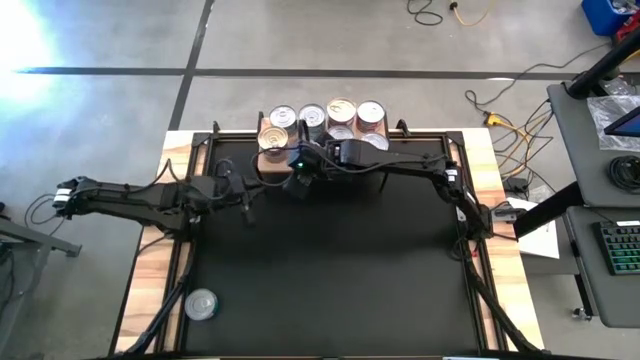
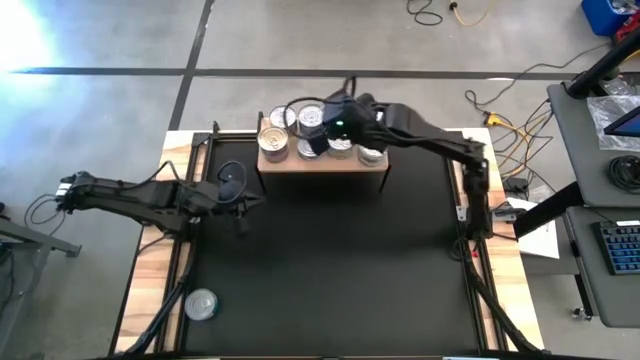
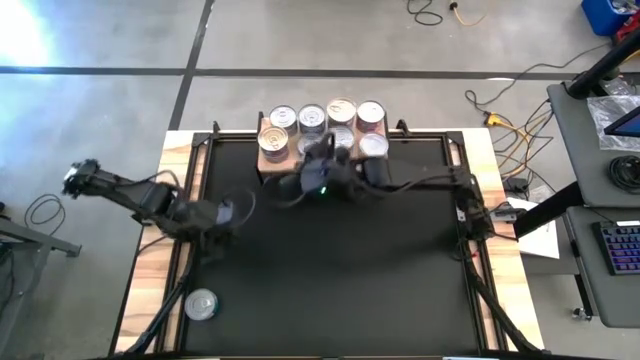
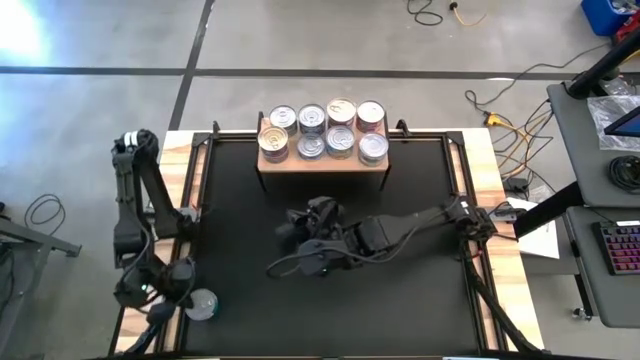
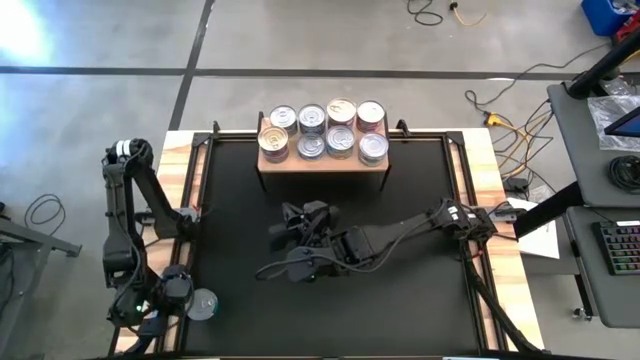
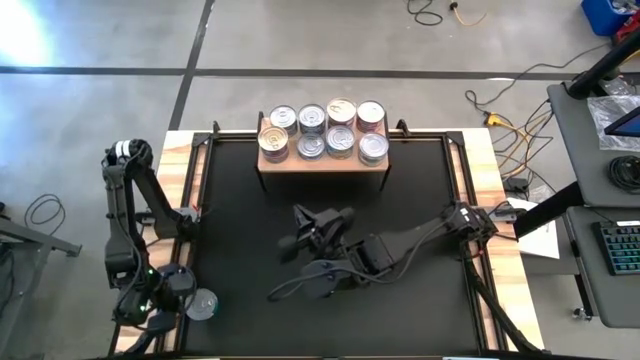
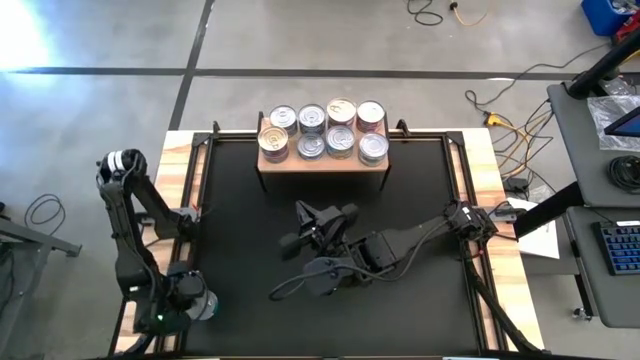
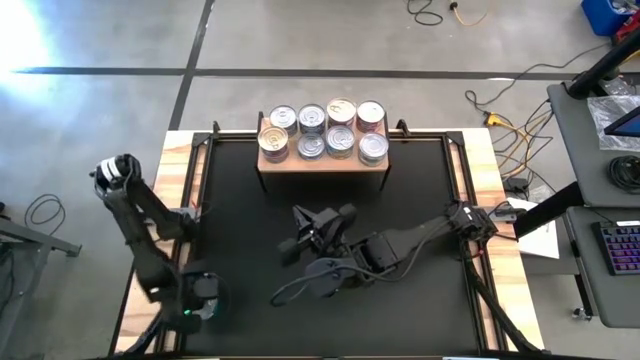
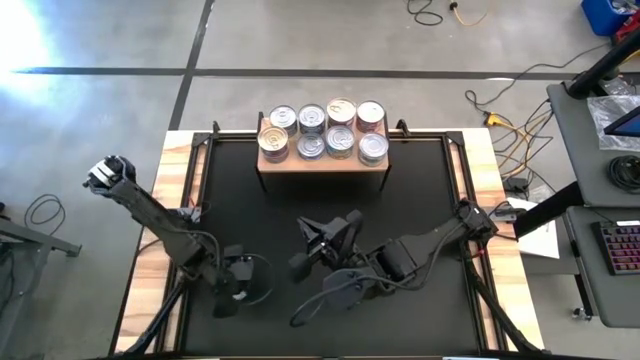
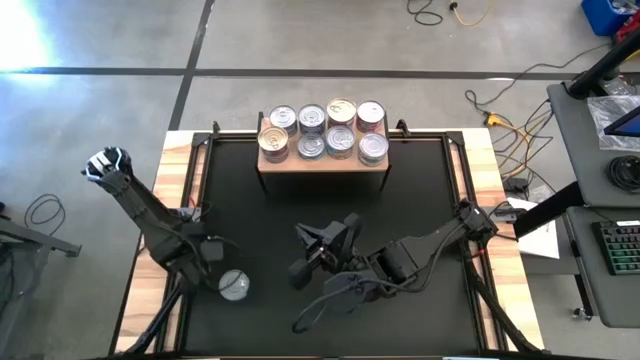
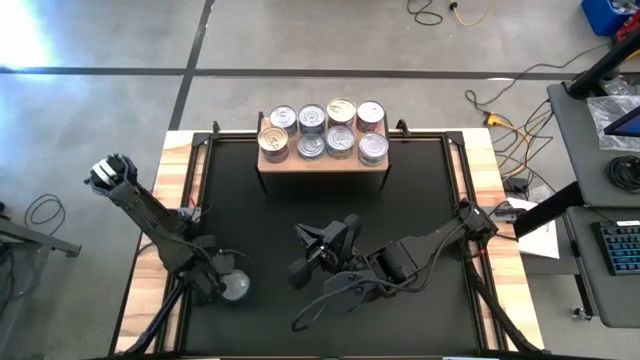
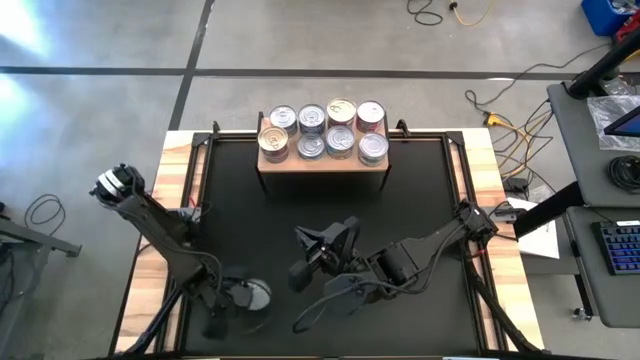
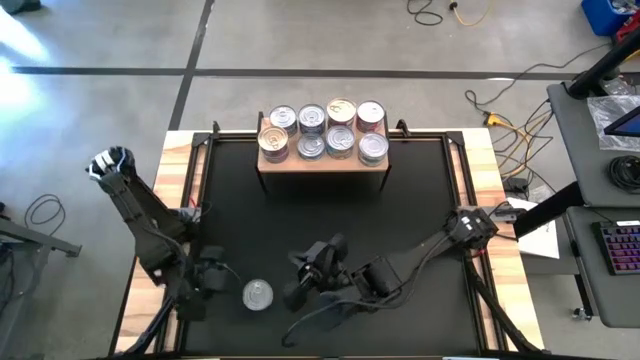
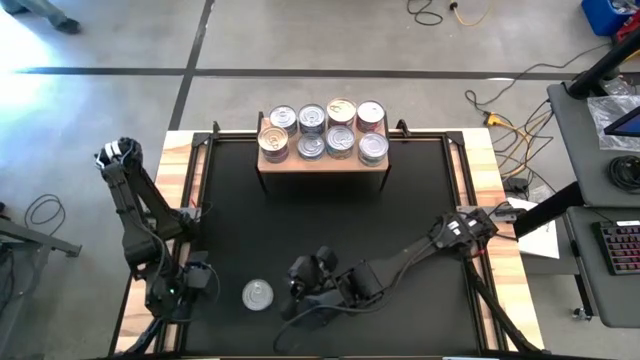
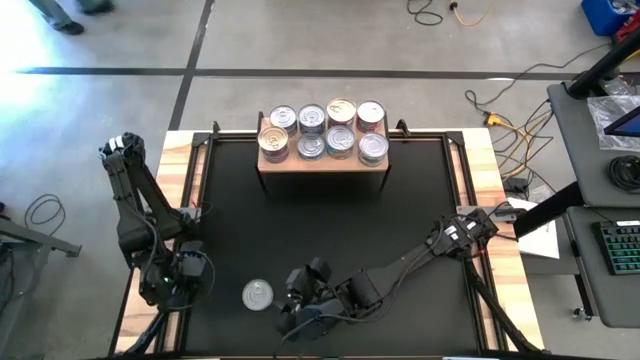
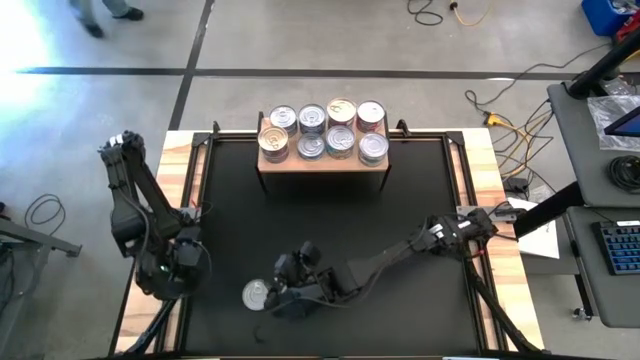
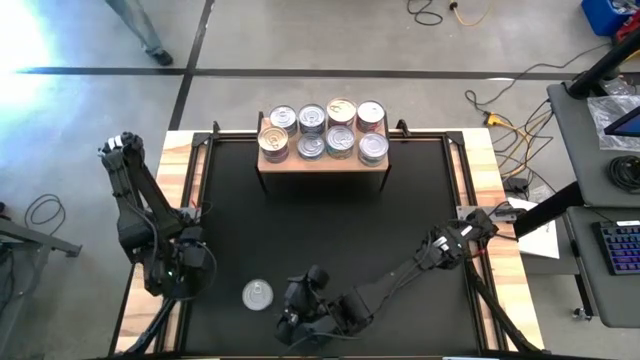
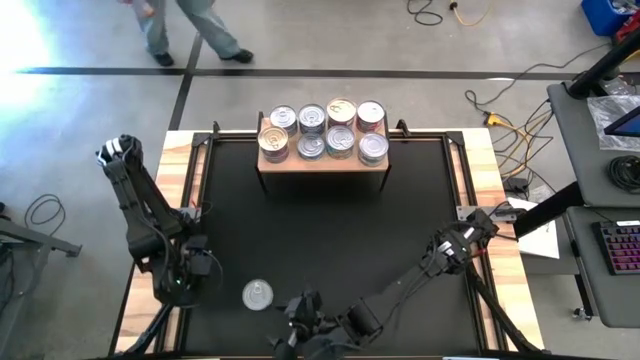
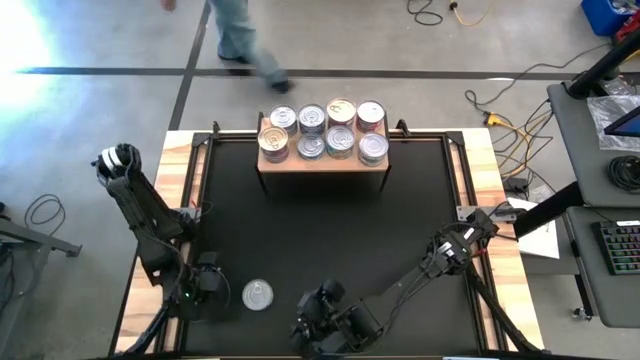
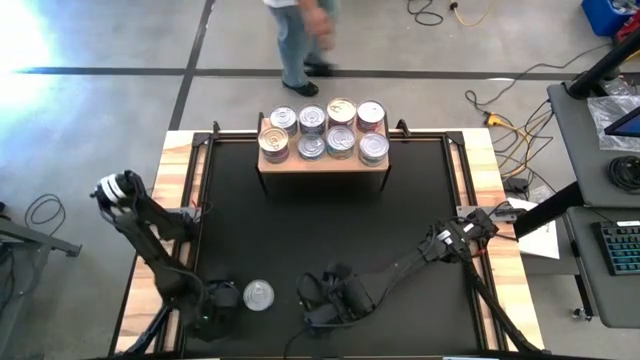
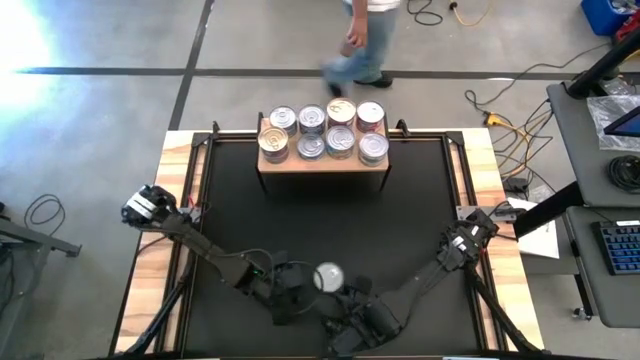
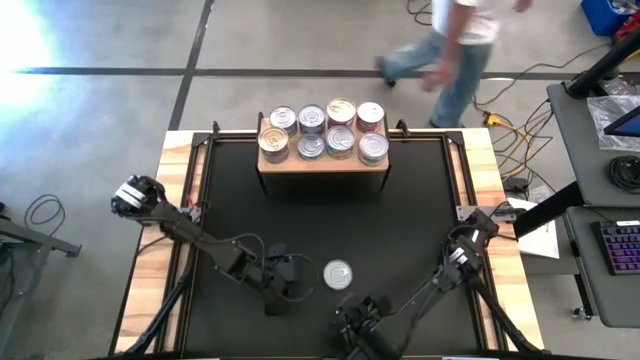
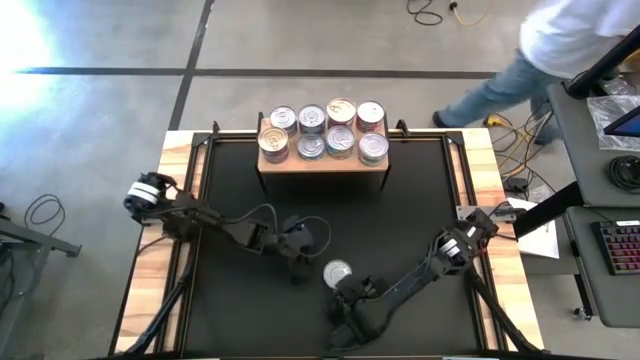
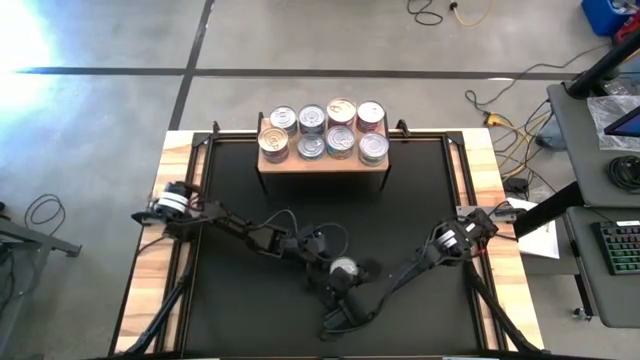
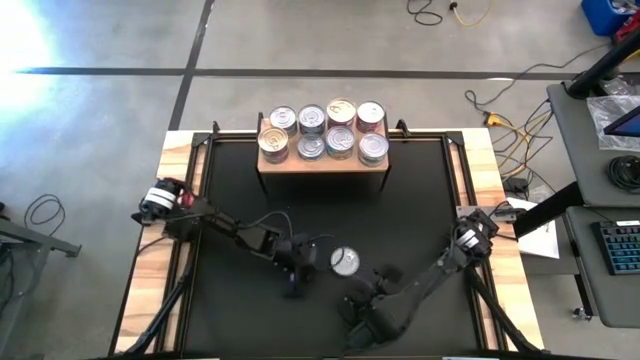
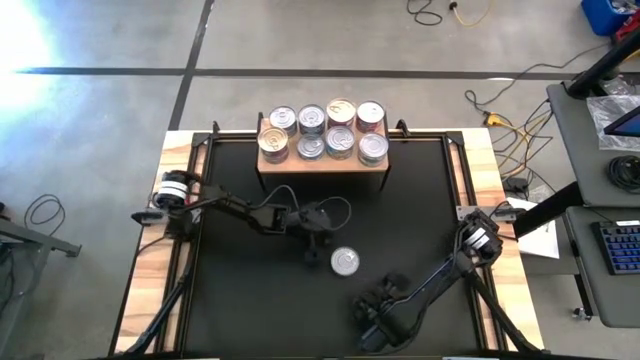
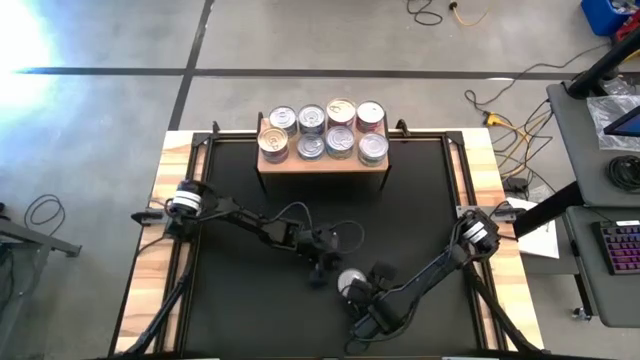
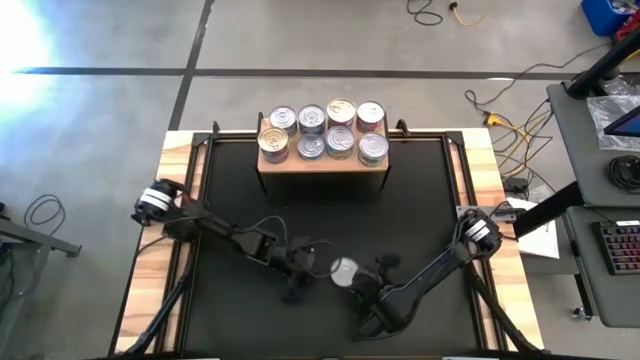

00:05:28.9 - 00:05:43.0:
Task: Stack canned seafood by type on shelf
Stack the green-blue tuna can on top of the other green-blue tuna can on the shelf

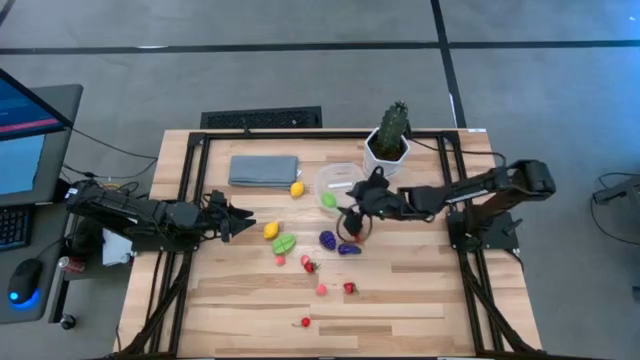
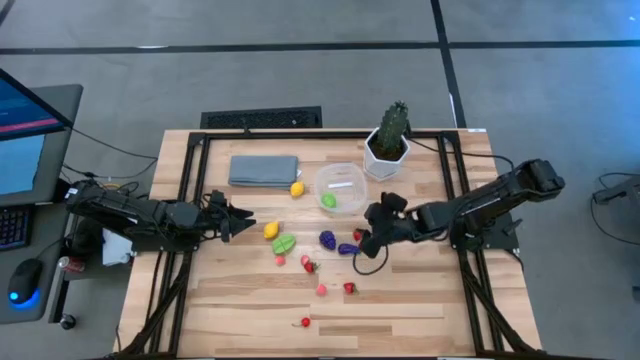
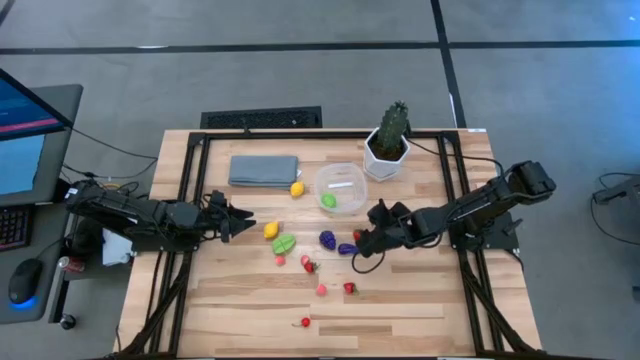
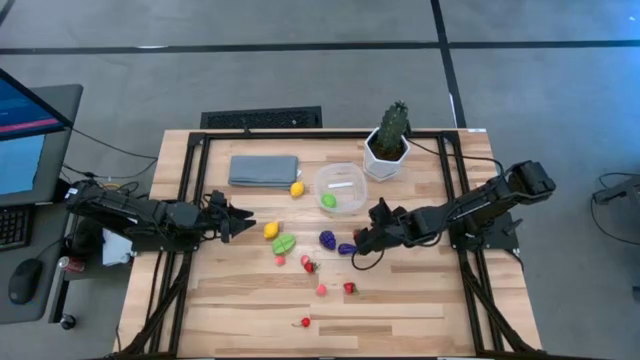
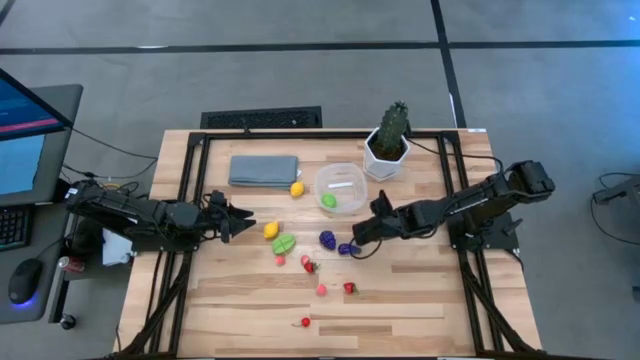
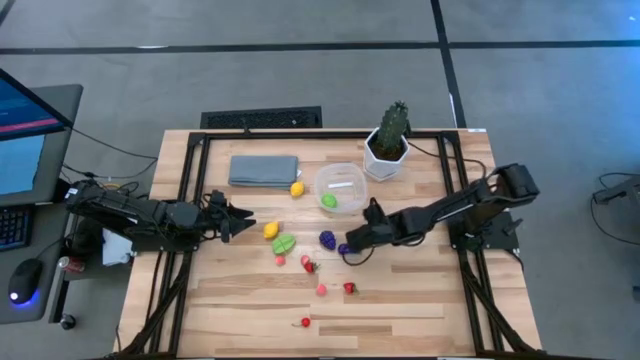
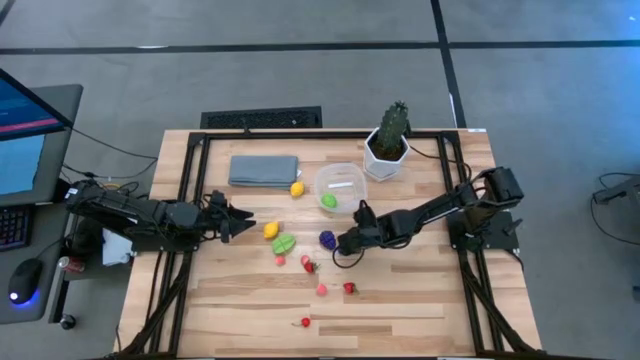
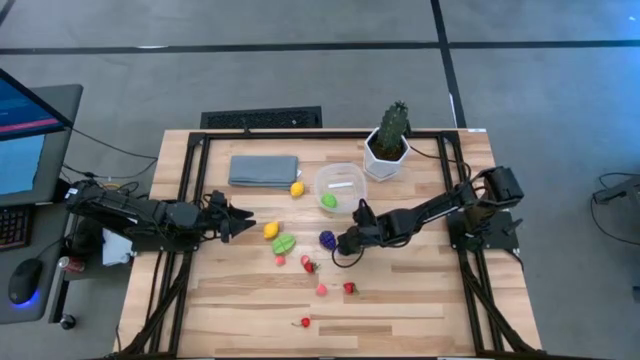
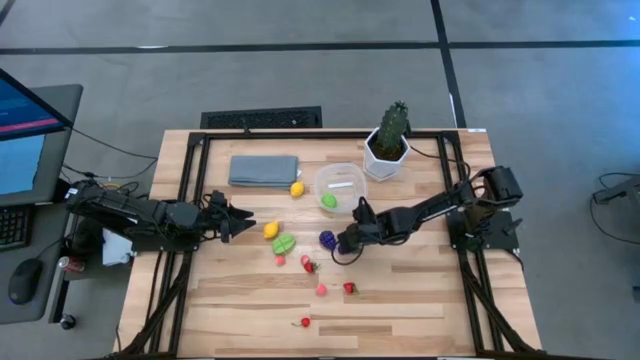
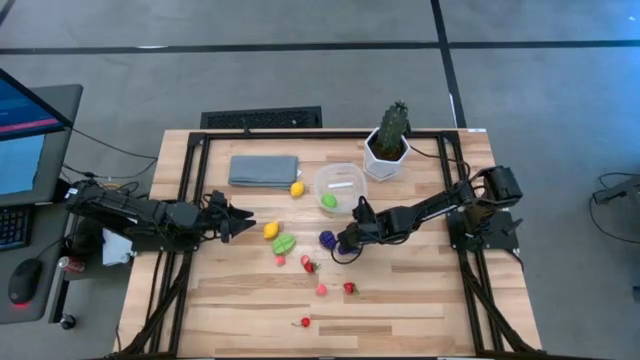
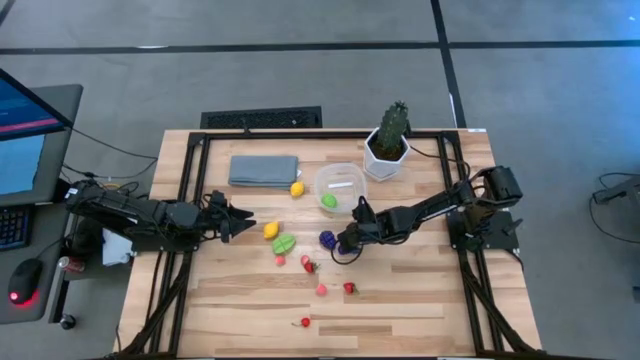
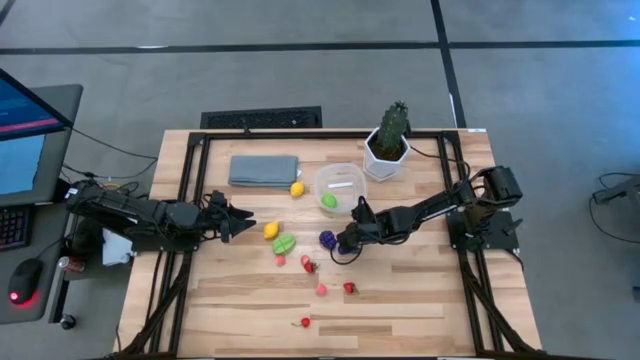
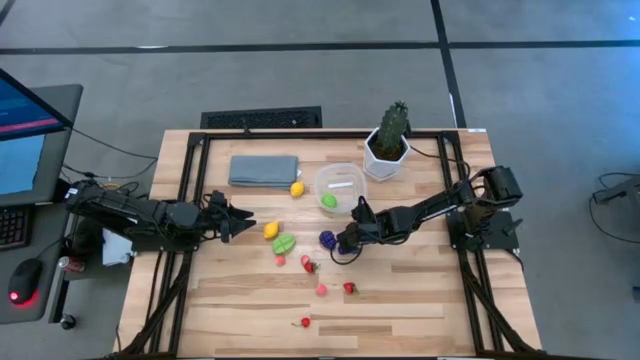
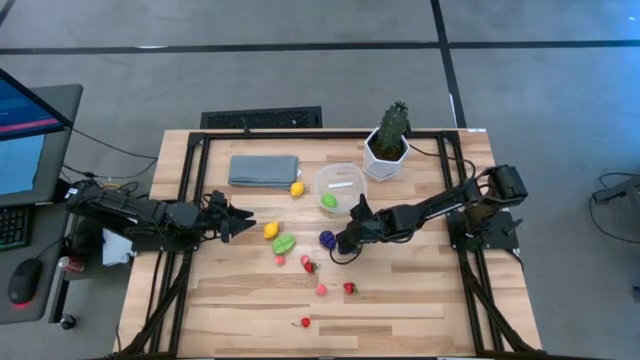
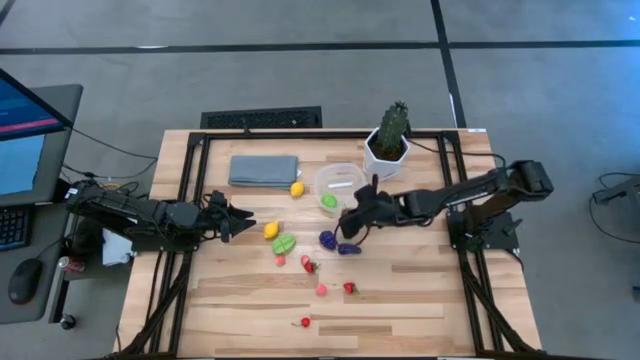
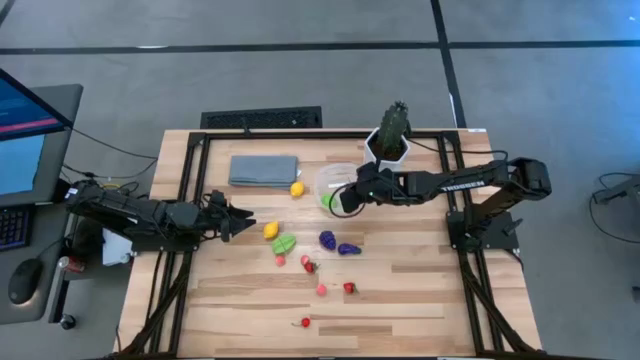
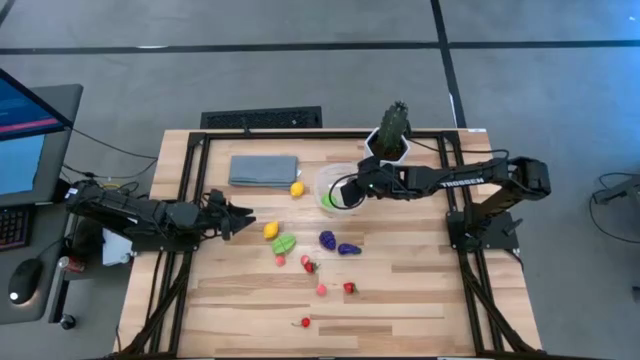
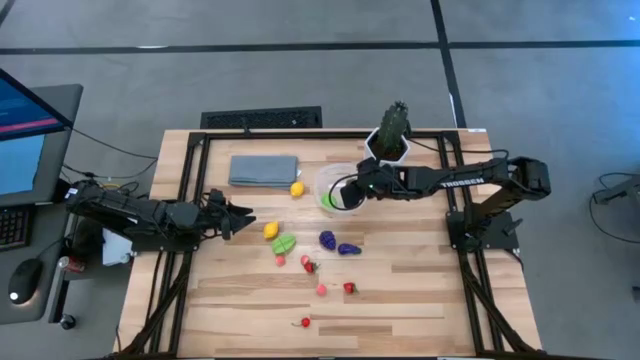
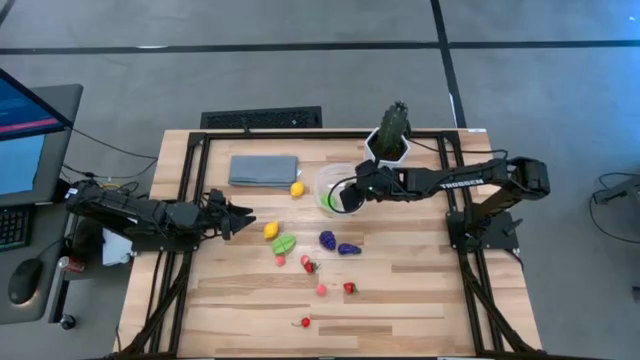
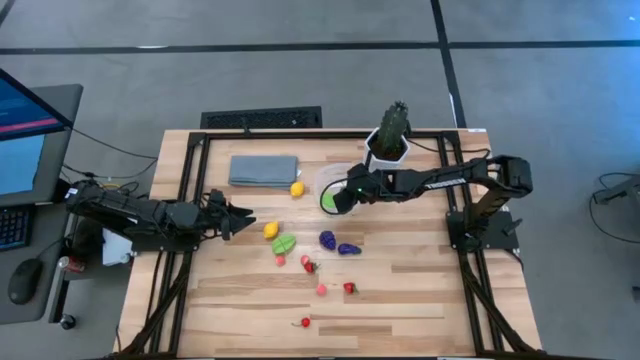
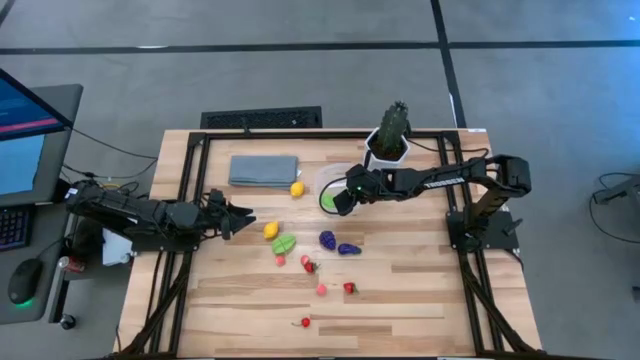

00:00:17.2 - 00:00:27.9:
Task: Pick and placing Produce into tupperware
Put the top right strawberry into the transparent bin
